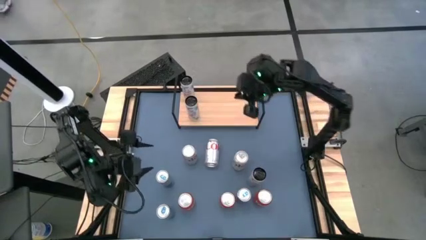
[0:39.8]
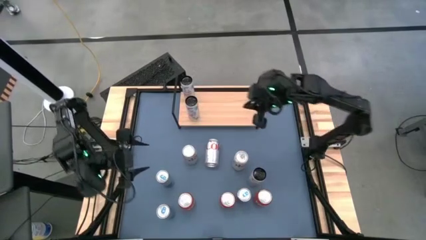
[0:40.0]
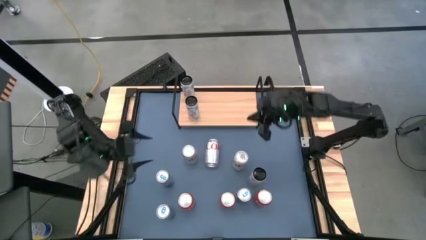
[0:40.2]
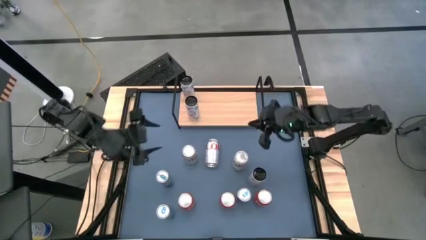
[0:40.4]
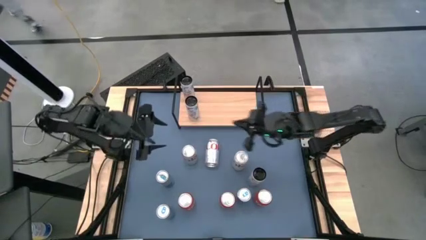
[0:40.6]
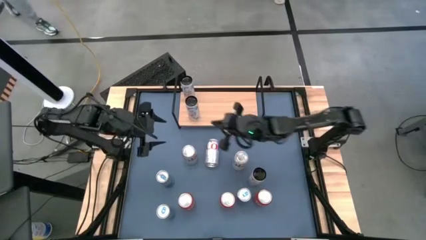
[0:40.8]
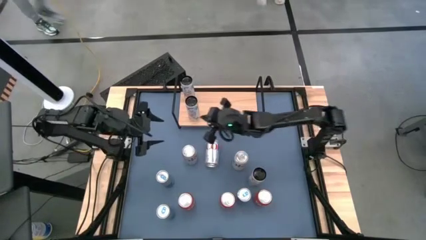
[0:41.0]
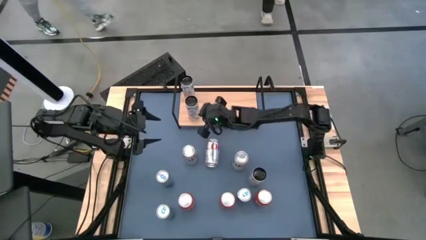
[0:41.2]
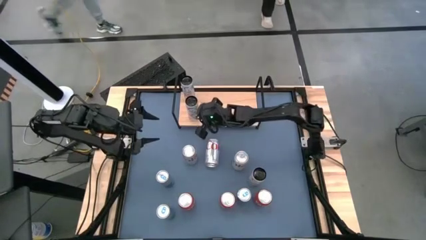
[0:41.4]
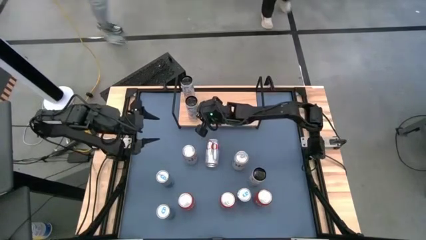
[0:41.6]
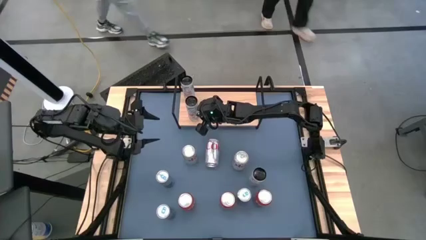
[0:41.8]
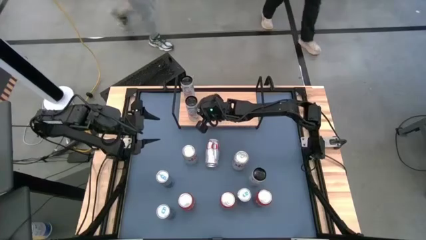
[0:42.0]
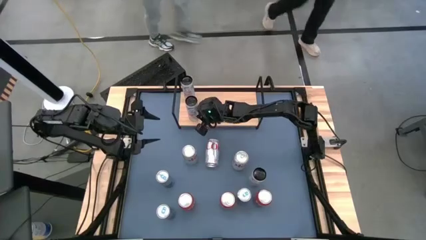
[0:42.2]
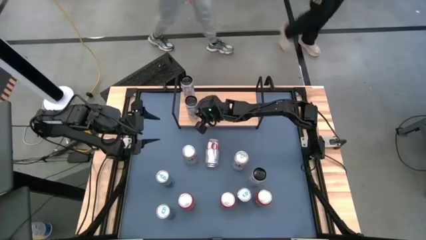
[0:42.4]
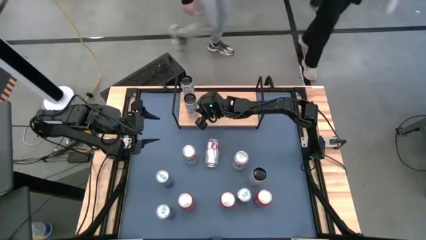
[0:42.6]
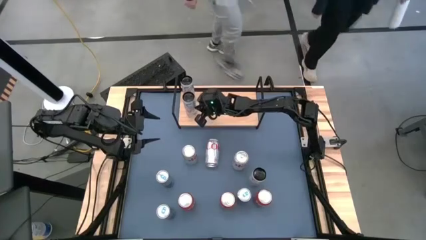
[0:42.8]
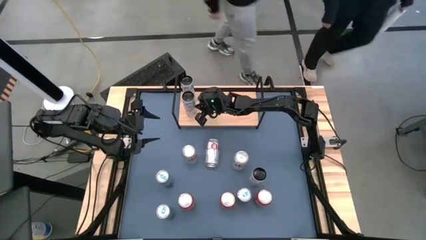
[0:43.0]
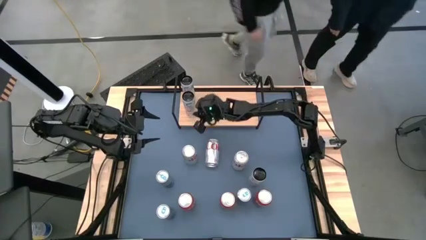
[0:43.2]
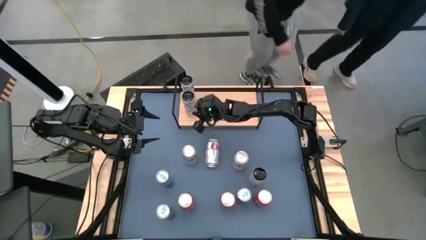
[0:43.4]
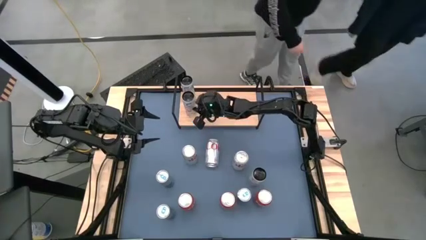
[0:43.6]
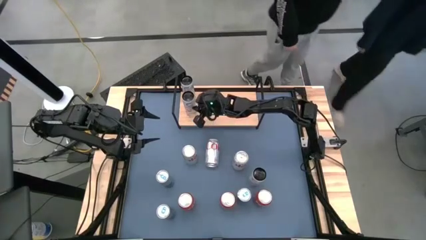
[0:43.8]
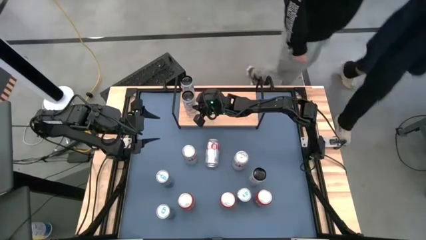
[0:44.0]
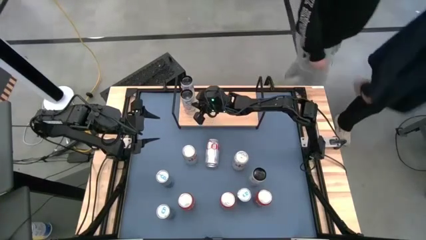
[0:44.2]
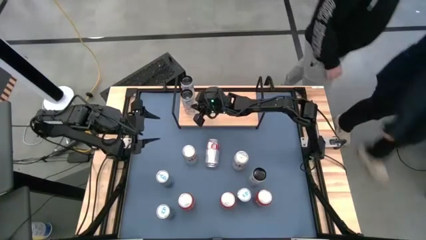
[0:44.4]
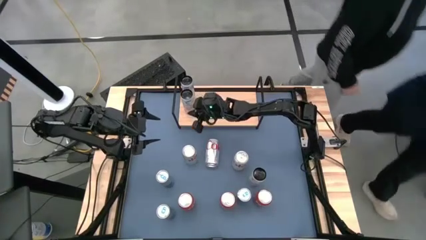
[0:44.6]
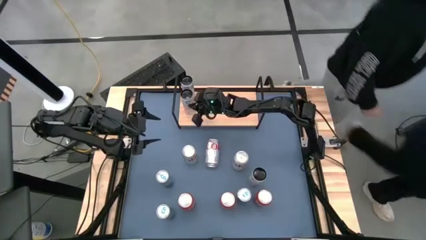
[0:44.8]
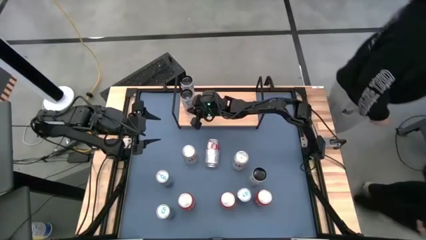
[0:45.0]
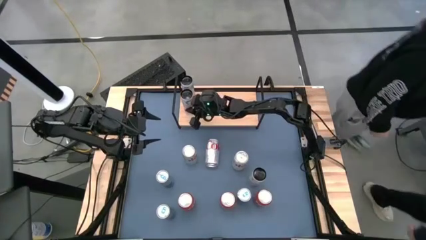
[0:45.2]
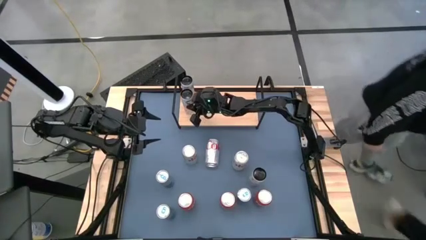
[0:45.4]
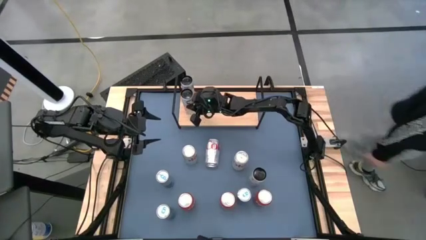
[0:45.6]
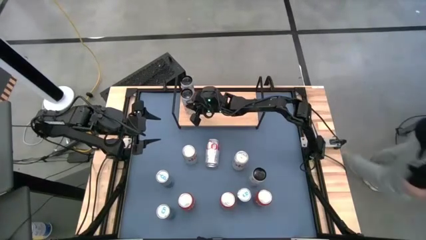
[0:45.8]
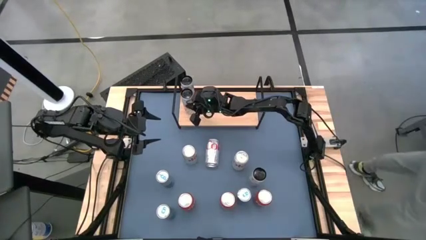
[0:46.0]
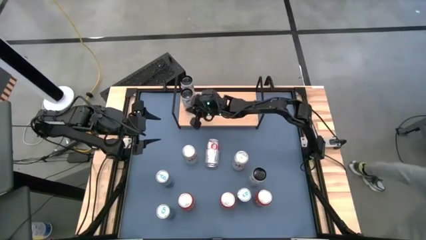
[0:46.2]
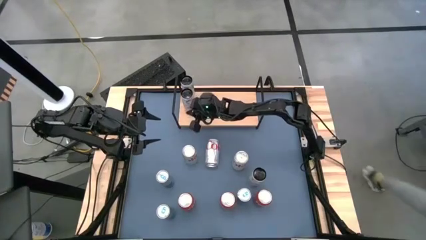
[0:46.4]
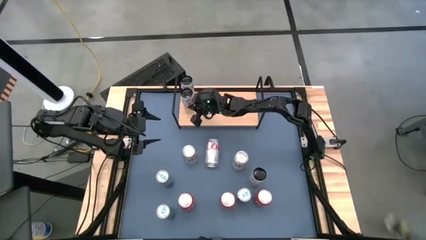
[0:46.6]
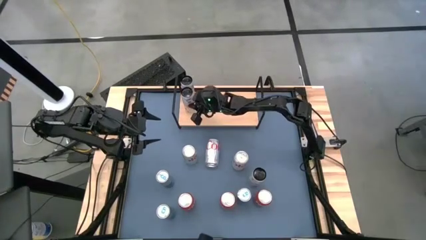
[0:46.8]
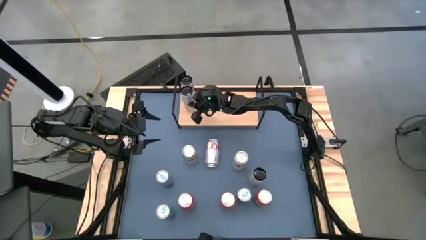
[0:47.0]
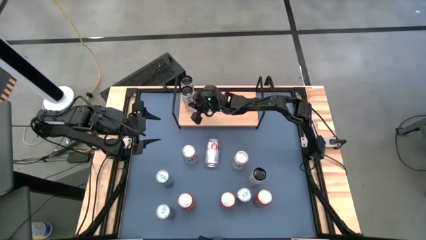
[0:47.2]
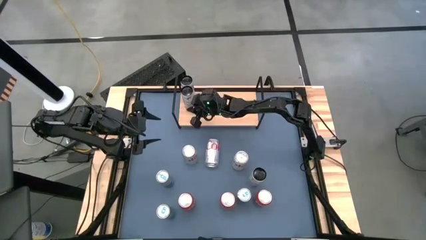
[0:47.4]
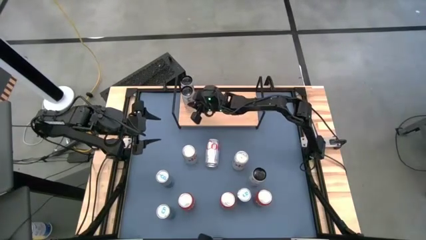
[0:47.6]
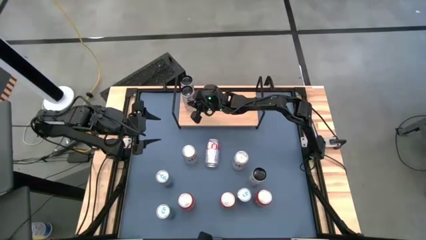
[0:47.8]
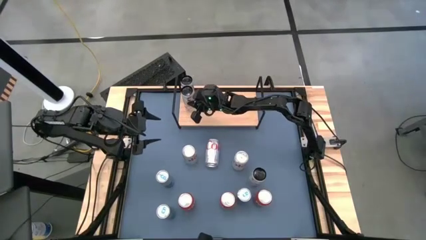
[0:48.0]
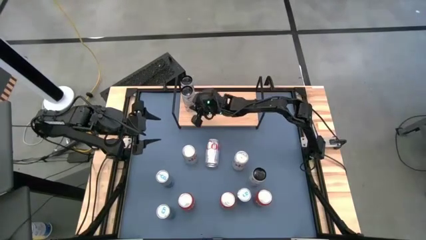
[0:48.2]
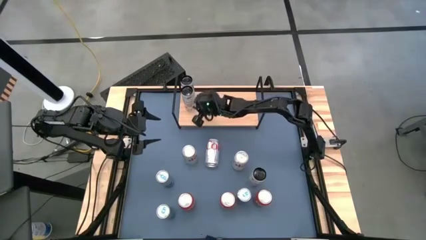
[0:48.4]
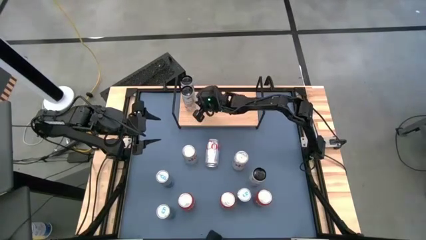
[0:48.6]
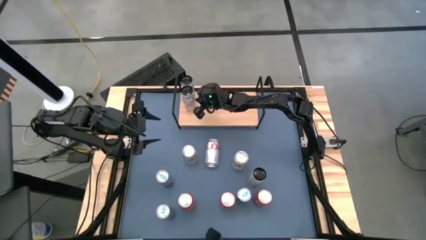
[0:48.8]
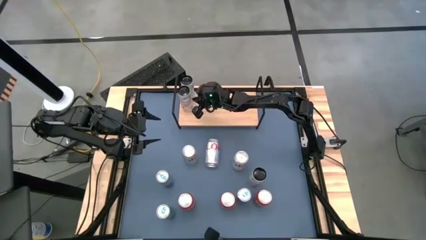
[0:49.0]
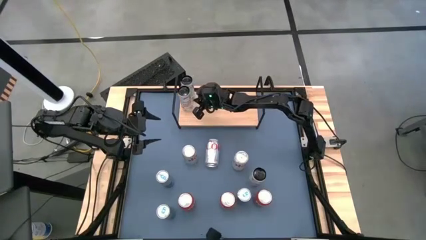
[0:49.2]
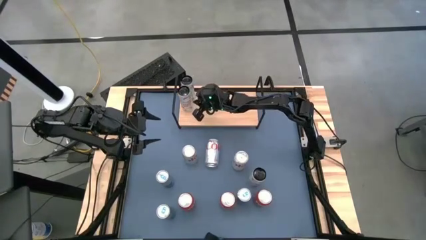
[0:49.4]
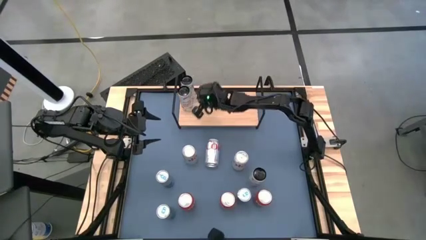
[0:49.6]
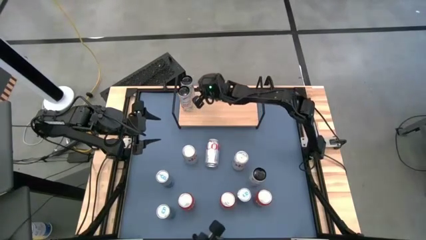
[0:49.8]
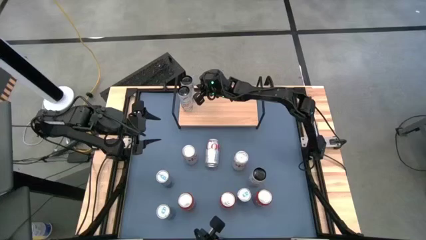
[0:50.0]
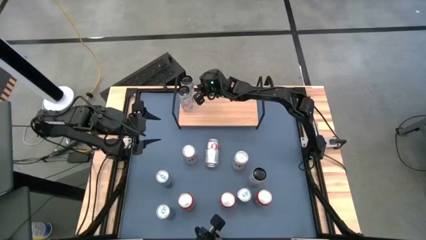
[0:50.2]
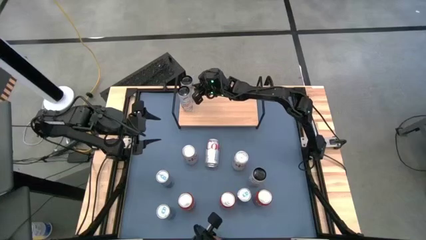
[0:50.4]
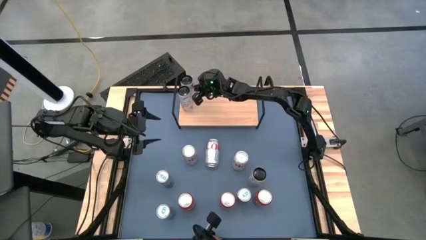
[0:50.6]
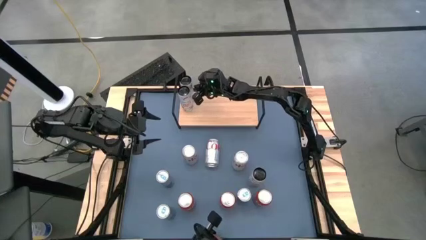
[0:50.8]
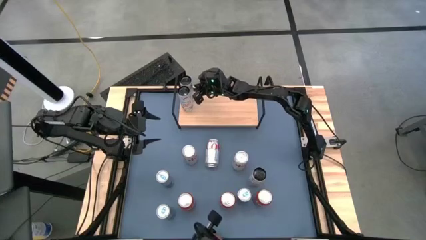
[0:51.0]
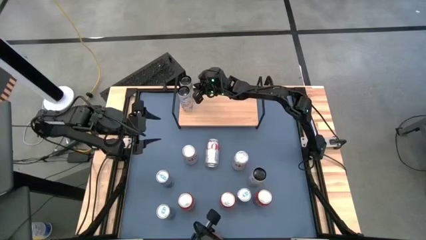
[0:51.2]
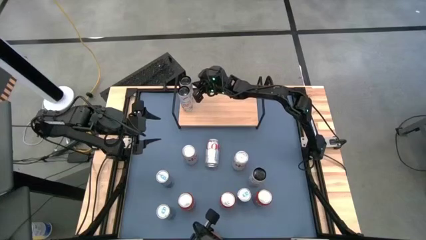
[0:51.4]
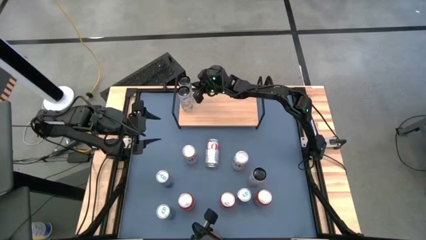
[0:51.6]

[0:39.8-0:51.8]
Task: Place canned beverage on shelf
Put the bottom white and pink soda can aligned with the other white and pink soda can on the shelf

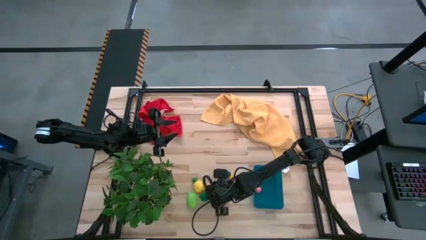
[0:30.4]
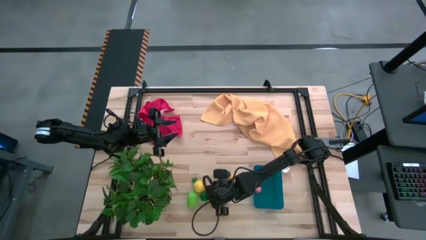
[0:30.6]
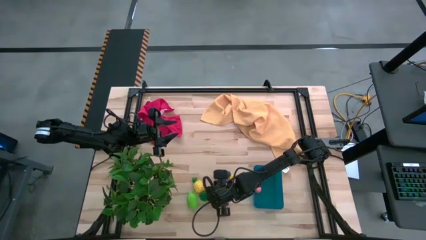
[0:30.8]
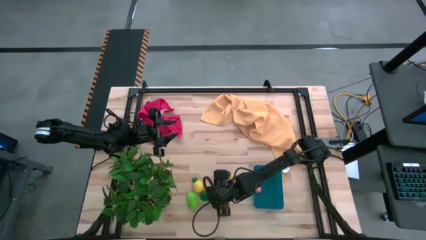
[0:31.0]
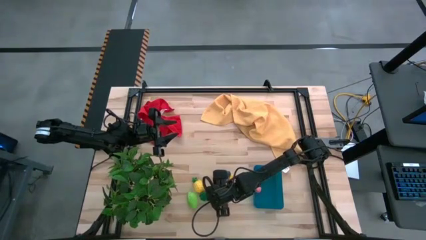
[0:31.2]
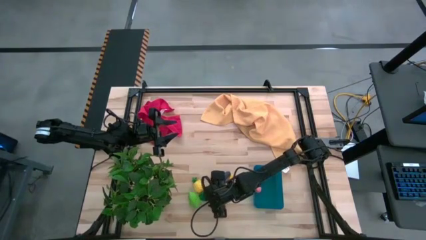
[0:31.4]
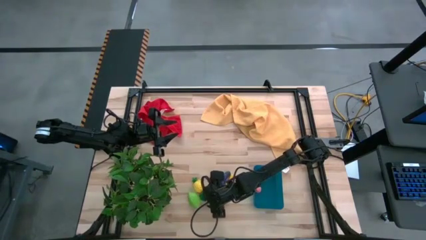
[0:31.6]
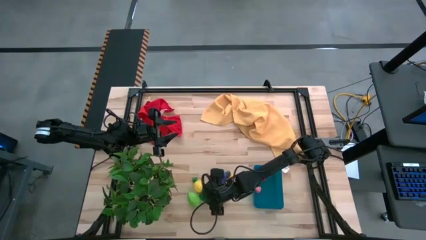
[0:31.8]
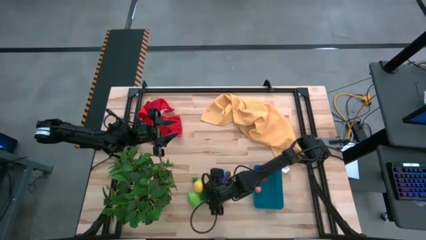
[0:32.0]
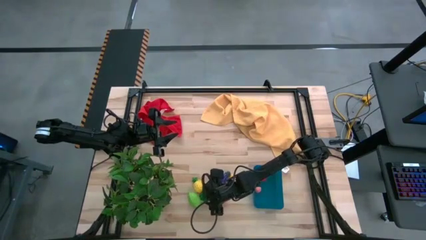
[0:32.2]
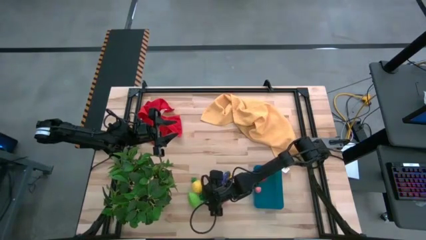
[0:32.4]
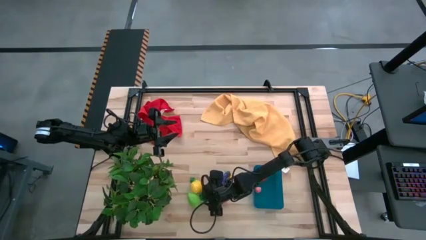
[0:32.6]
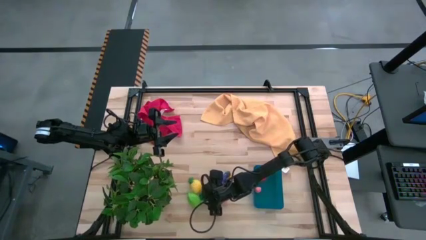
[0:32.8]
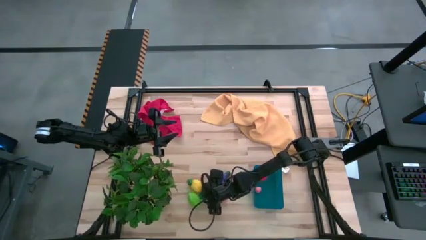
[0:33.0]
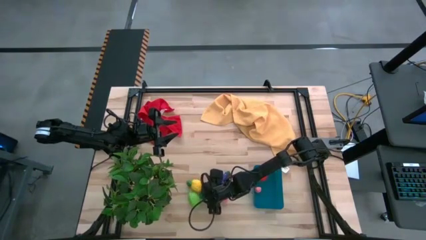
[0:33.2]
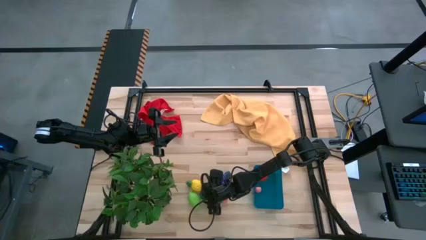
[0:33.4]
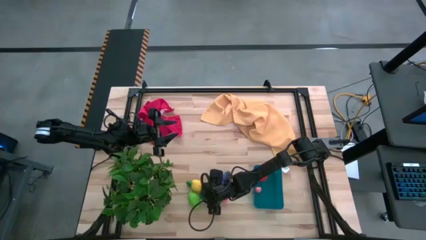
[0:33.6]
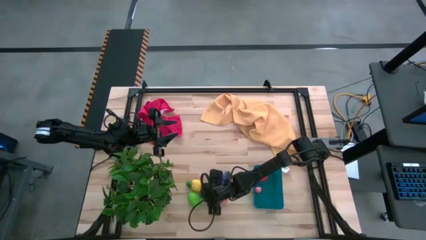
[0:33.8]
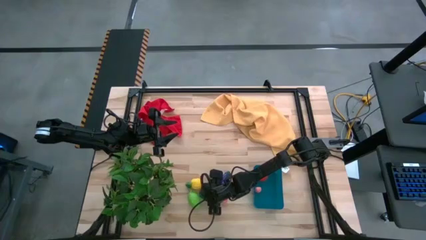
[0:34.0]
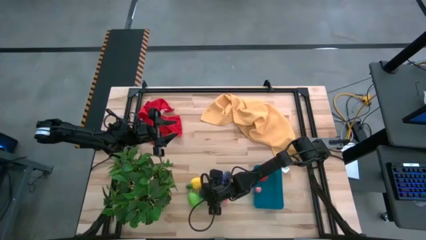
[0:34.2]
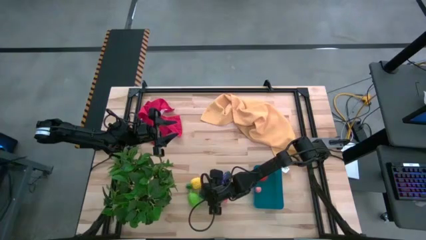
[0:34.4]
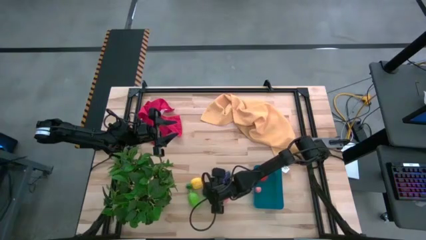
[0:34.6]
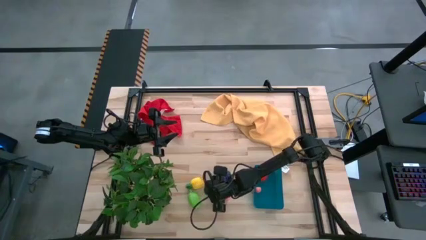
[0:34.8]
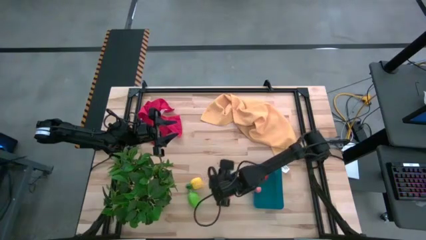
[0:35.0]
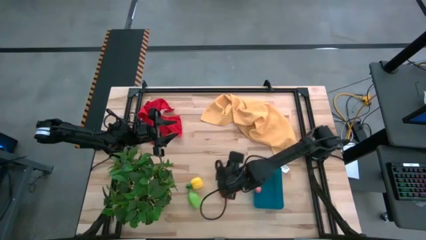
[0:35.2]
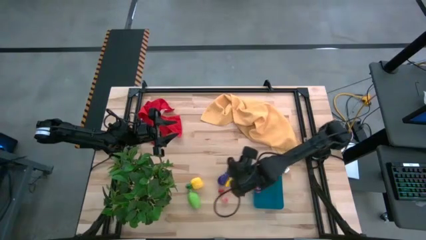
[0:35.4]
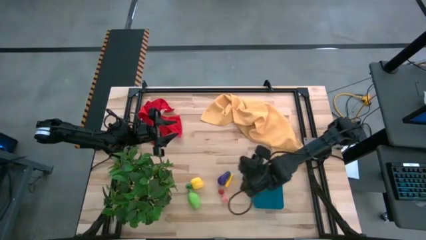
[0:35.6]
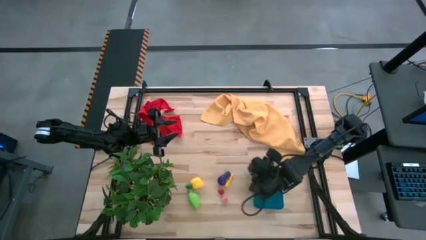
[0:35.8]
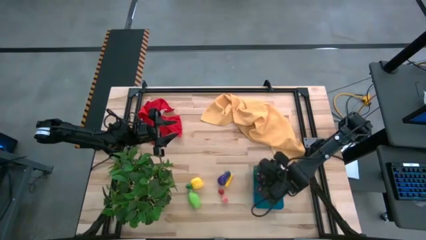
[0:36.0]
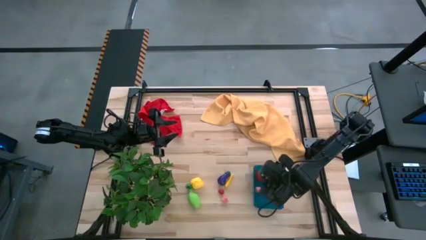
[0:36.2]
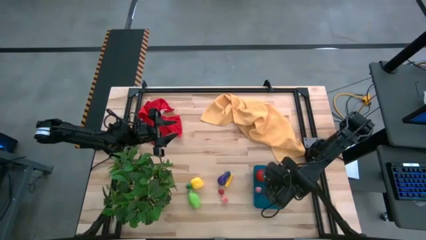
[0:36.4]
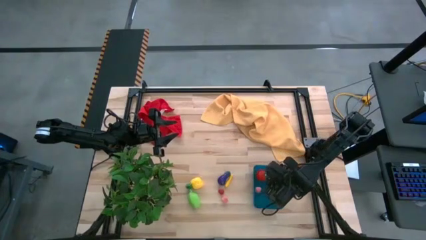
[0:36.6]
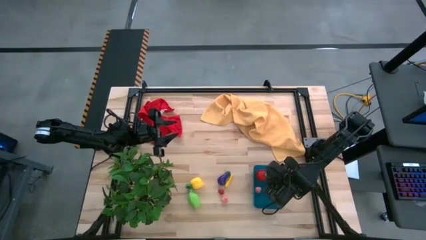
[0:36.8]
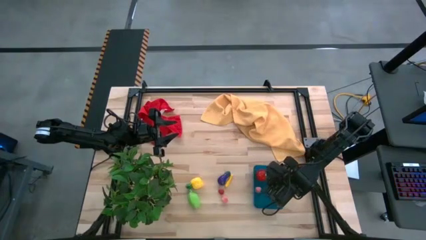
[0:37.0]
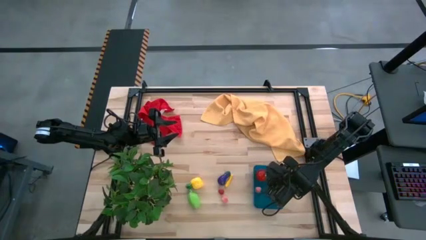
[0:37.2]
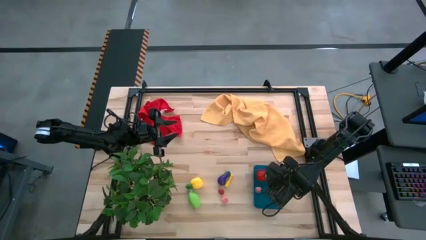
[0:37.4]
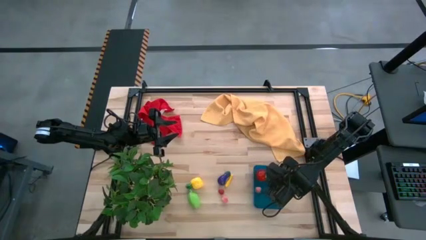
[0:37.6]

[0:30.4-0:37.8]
Task: Pick and placing Produce into tupperware
Put the green bell pepper into the blue bin
